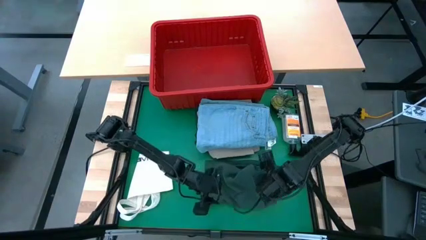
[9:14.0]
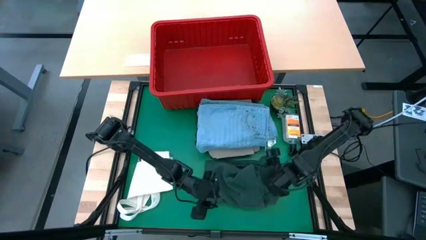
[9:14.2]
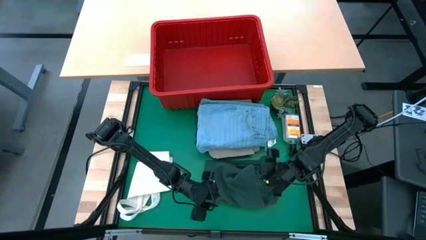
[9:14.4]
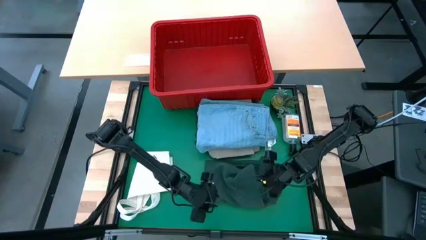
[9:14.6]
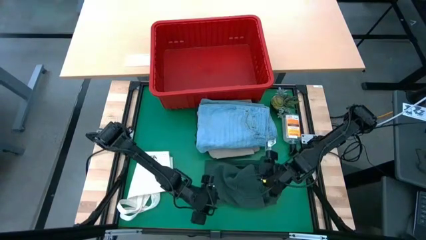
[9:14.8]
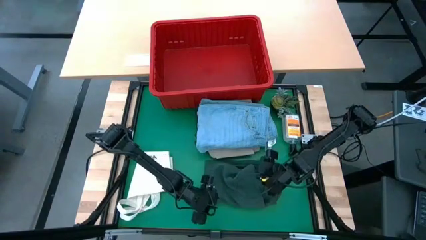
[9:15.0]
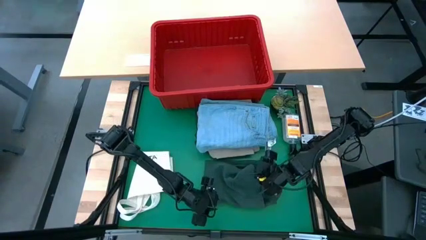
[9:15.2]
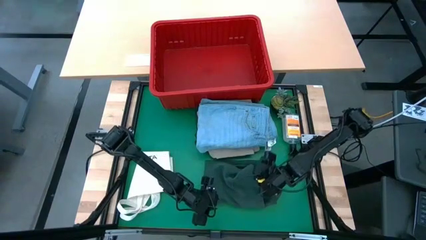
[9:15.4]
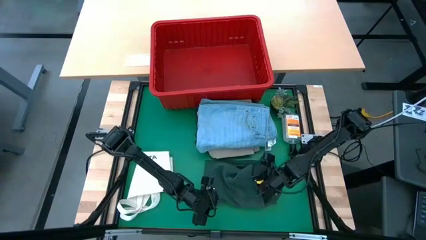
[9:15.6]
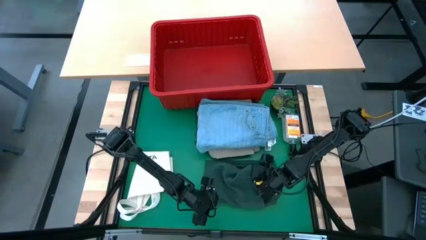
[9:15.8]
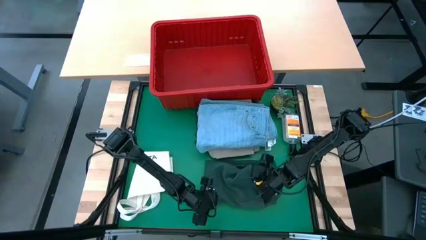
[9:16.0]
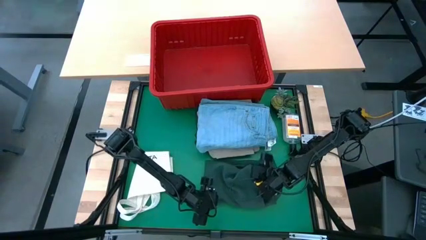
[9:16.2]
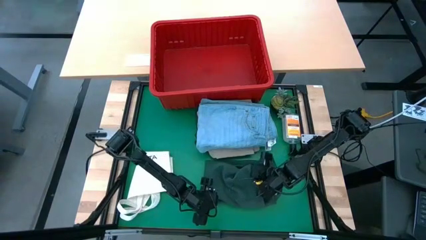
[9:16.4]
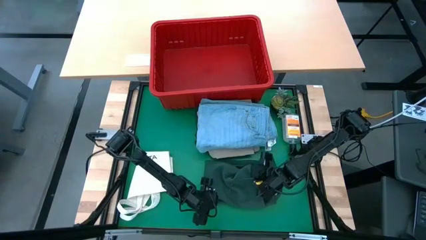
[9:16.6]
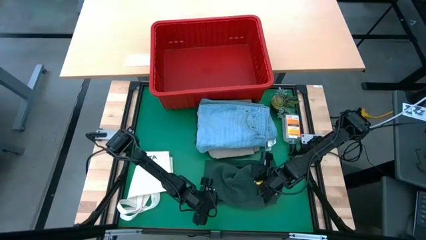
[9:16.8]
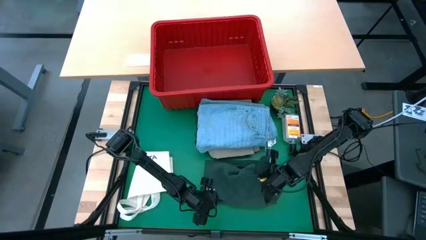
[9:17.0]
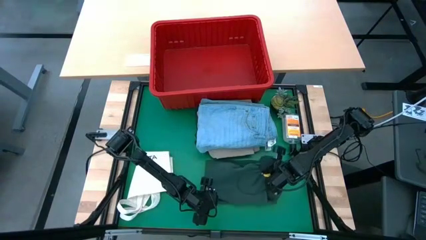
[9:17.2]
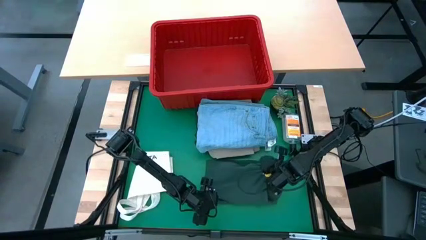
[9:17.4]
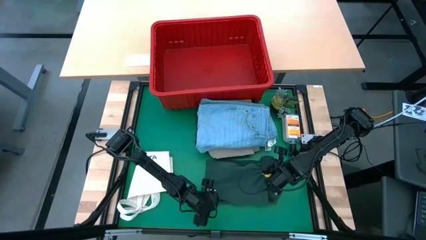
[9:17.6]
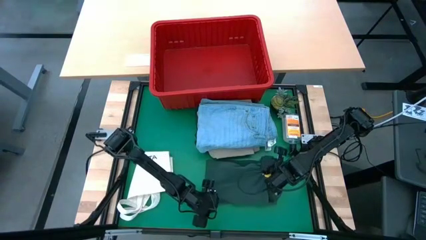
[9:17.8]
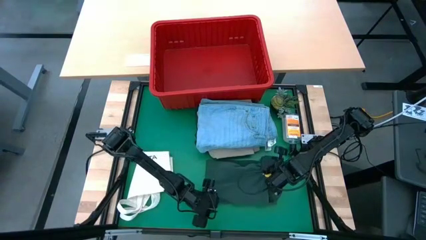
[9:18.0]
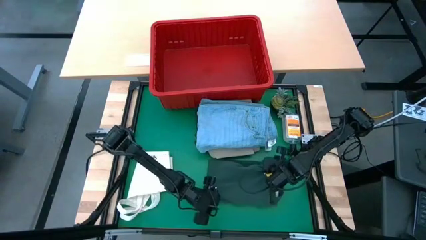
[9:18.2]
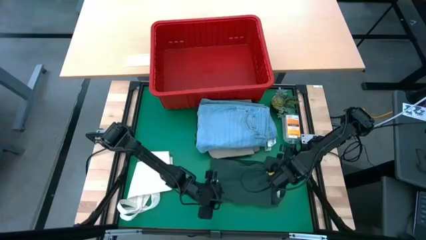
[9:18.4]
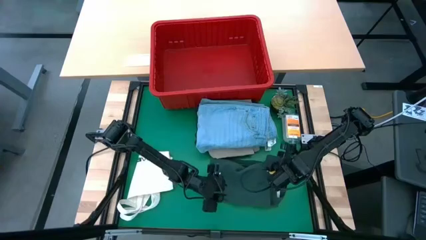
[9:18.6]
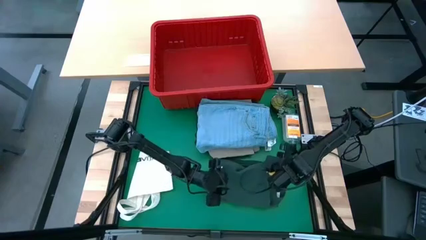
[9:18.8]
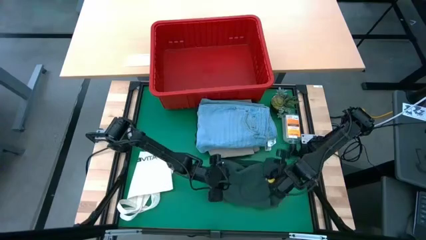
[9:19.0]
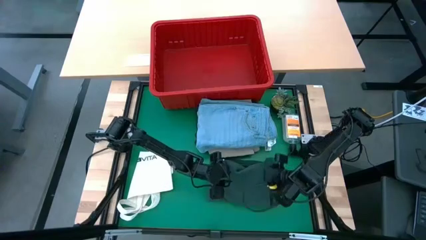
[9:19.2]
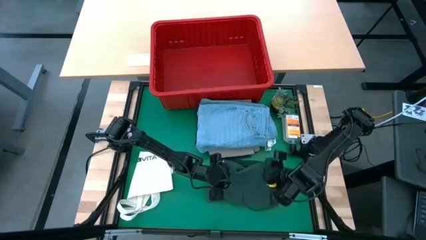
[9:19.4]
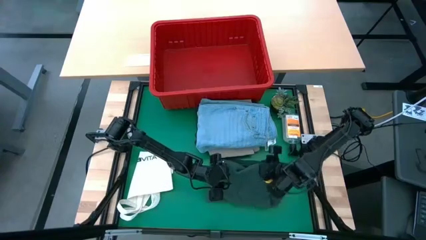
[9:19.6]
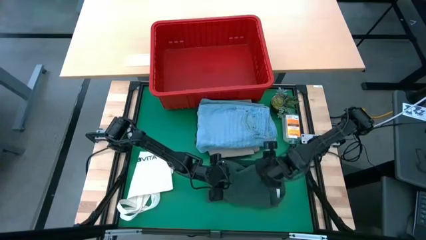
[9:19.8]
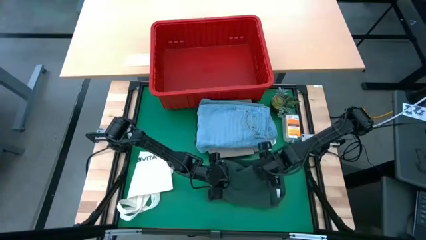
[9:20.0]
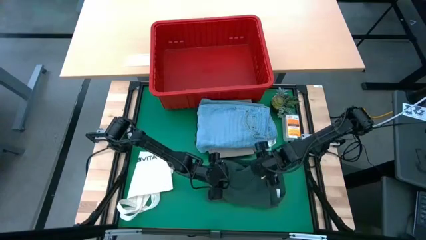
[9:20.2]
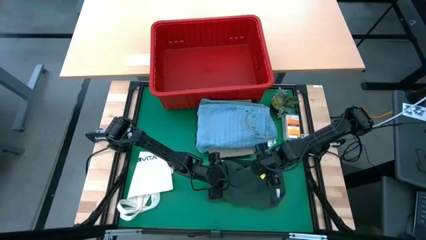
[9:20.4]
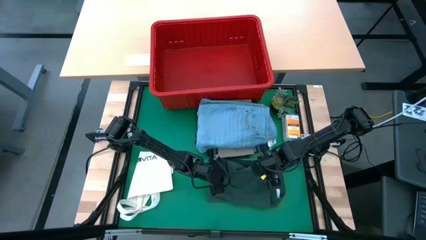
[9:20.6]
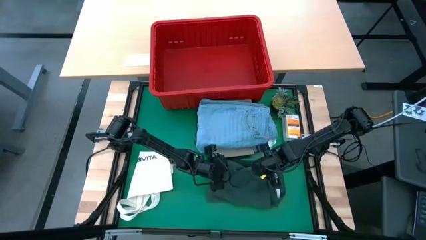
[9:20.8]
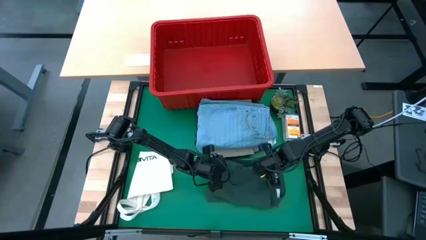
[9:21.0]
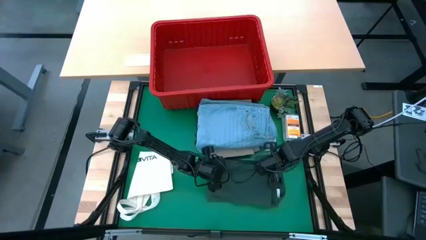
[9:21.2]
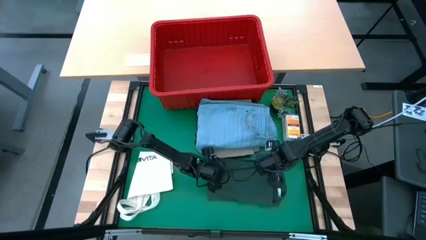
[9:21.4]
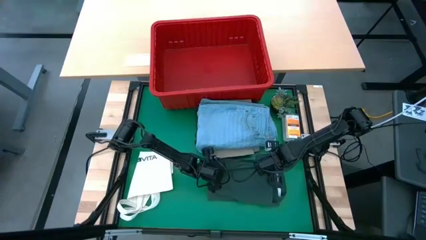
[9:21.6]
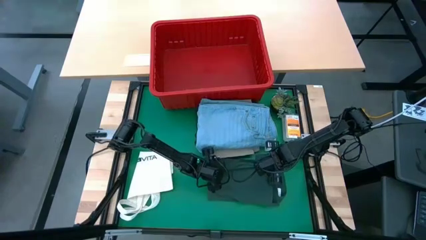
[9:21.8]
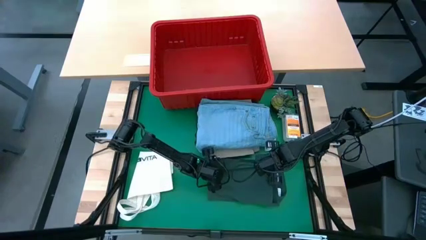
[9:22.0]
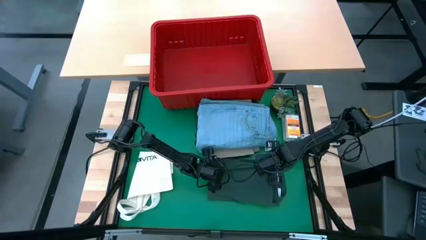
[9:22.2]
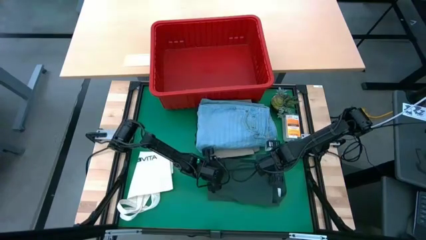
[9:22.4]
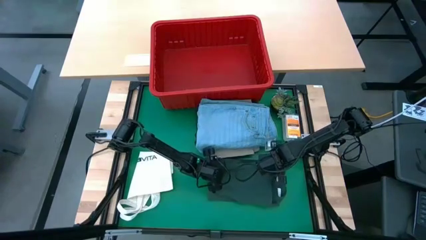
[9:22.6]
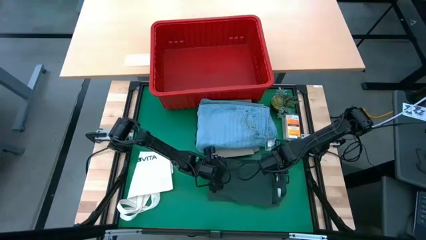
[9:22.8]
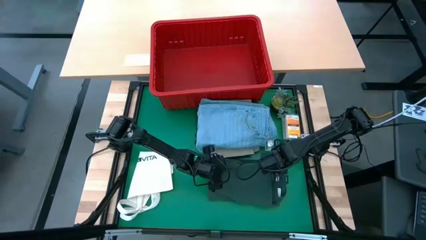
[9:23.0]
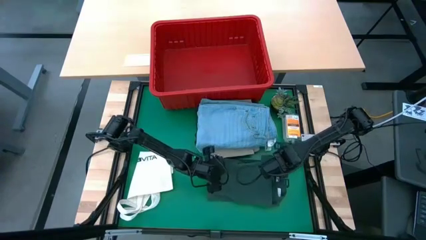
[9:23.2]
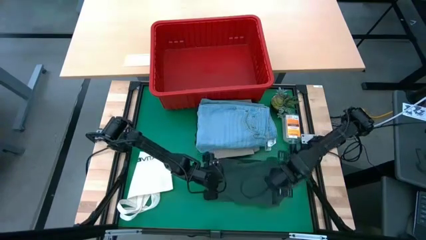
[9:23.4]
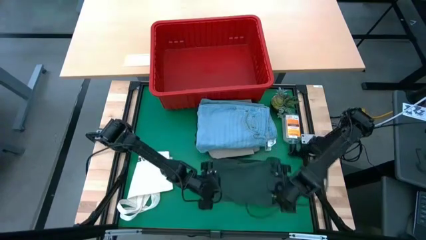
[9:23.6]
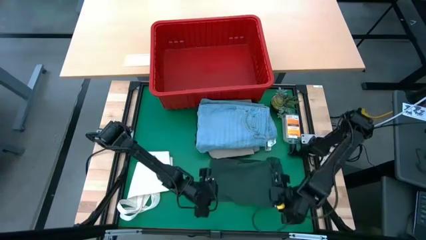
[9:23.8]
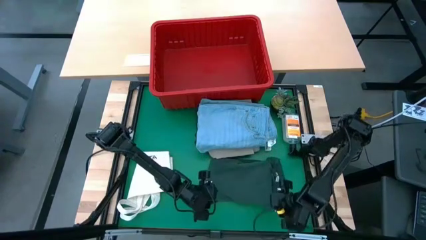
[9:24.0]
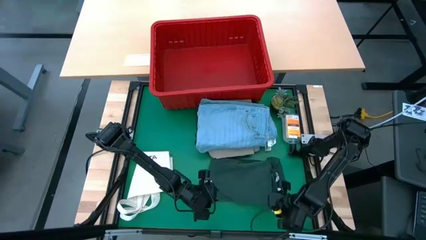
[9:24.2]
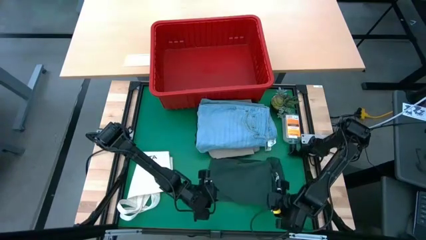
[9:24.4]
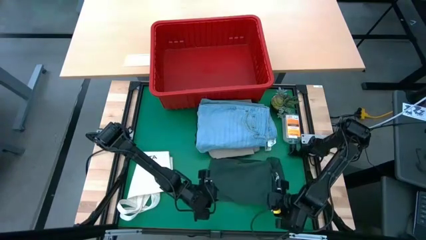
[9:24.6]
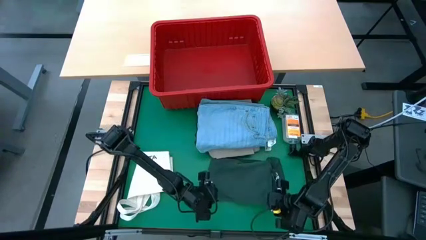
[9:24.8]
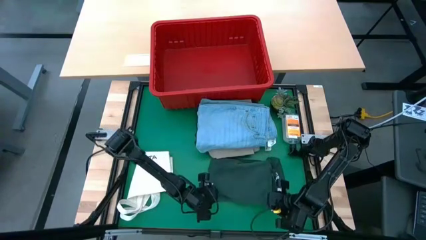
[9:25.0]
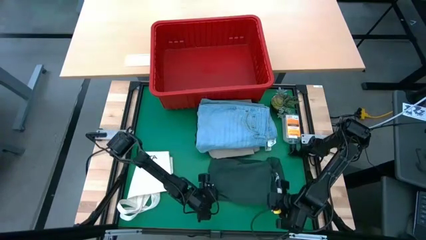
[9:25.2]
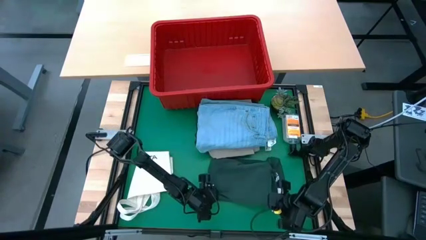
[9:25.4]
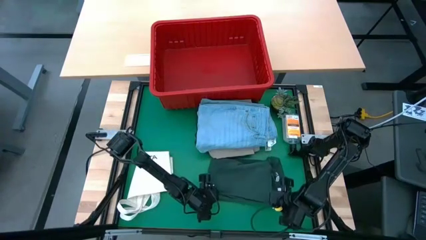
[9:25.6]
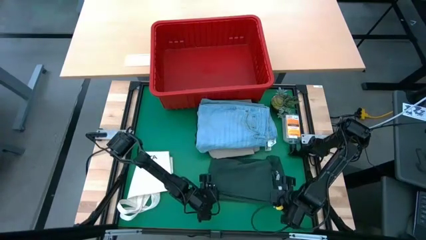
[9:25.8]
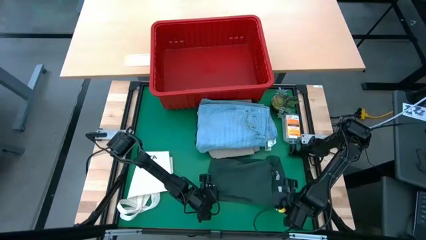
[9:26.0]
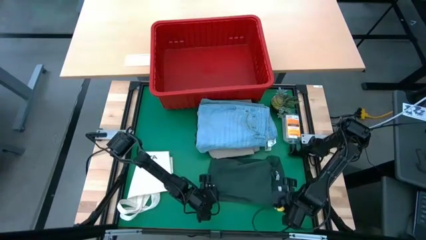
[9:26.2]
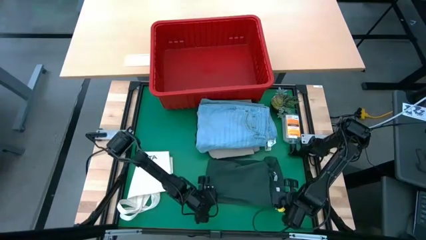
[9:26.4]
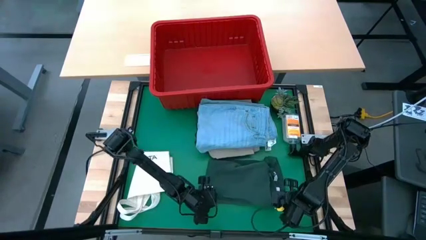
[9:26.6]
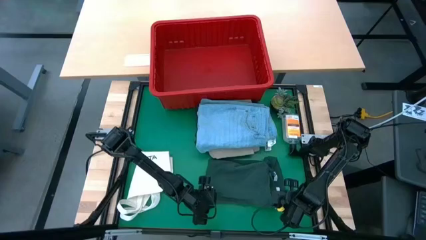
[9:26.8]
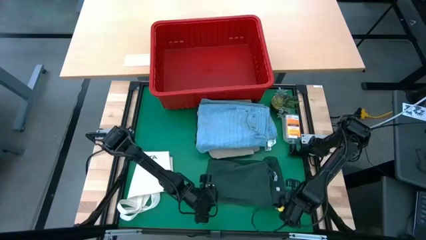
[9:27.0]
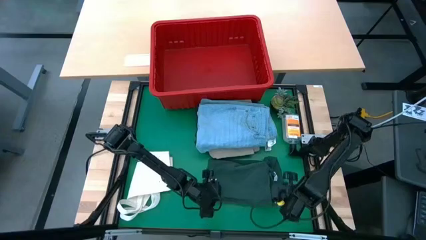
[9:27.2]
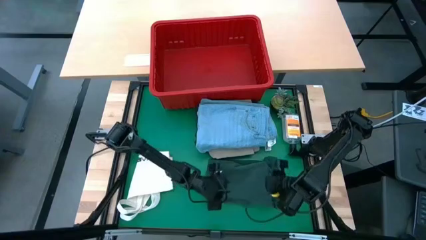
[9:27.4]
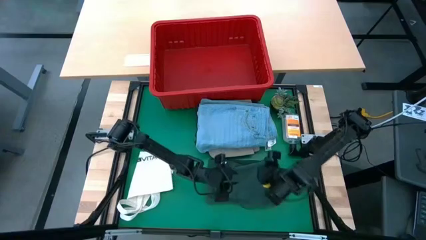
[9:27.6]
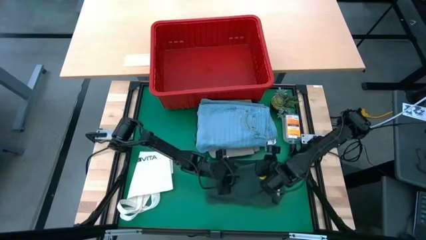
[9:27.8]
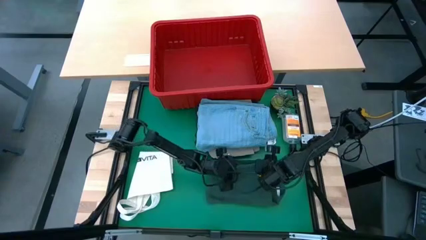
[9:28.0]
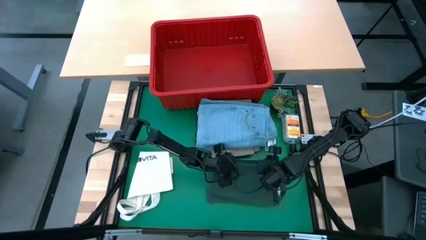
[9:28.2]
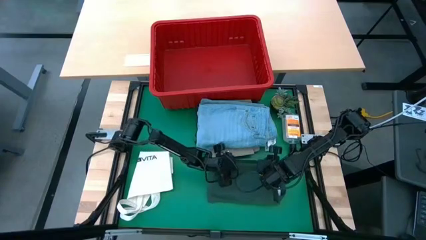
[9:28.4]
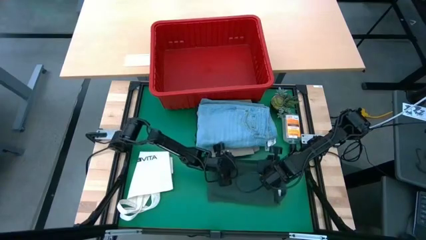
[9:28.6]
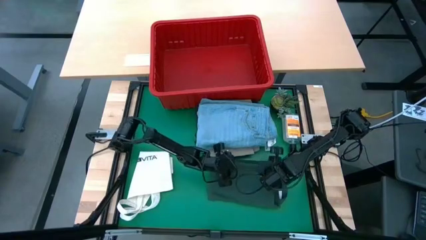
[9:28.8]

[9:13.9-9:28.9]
Task: Fold laundry
Fold the green polo shirt

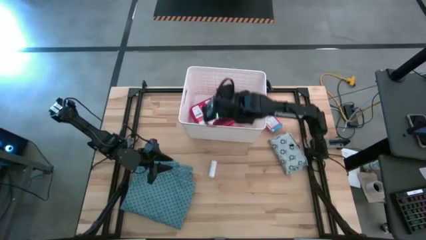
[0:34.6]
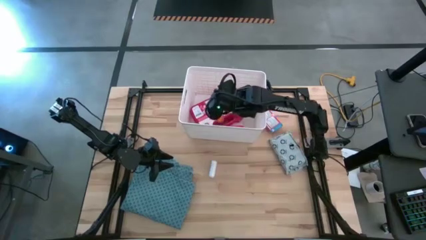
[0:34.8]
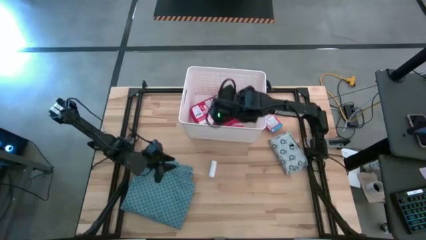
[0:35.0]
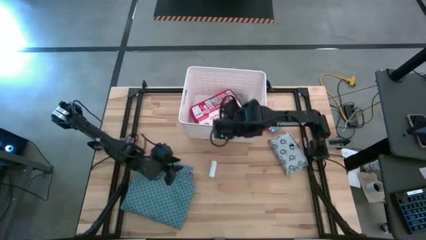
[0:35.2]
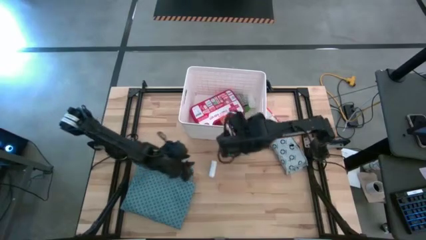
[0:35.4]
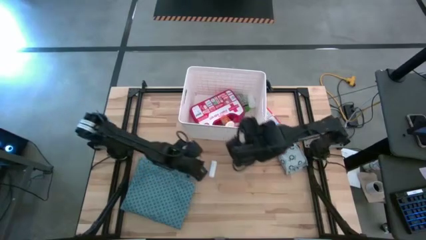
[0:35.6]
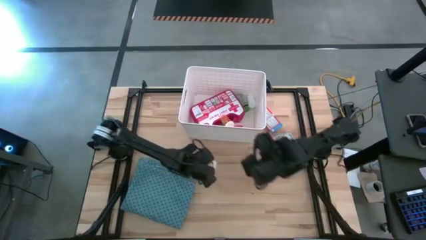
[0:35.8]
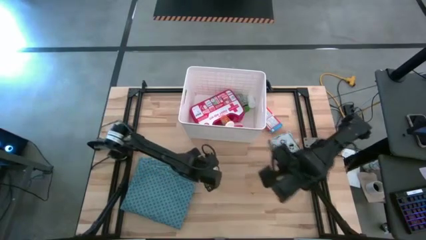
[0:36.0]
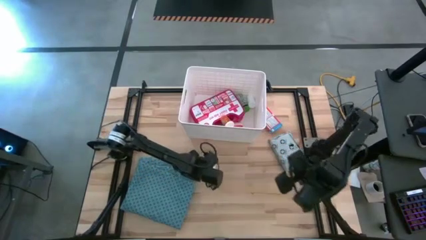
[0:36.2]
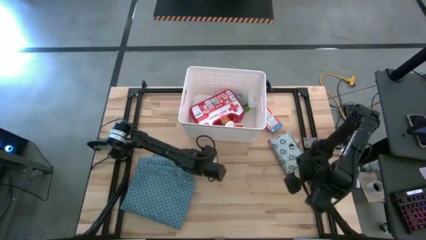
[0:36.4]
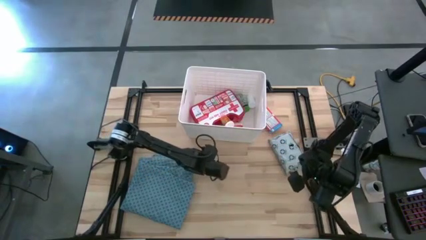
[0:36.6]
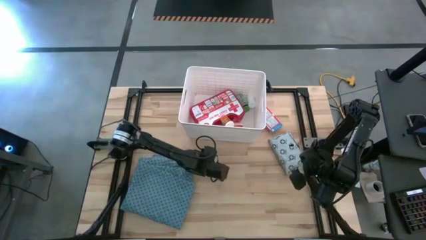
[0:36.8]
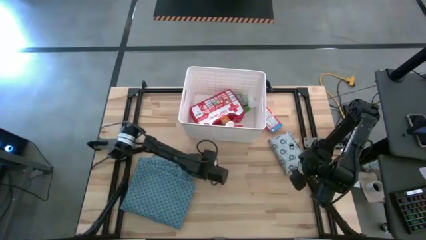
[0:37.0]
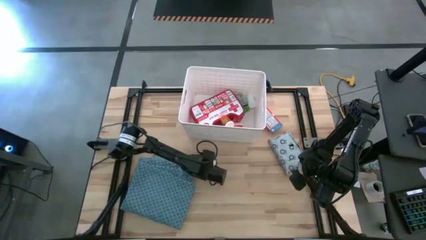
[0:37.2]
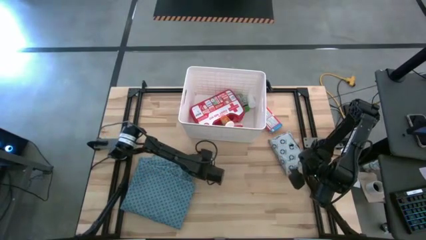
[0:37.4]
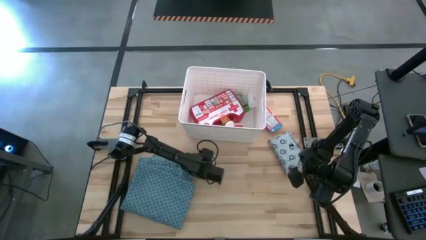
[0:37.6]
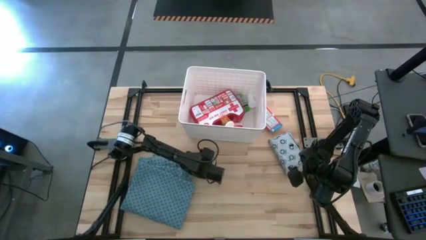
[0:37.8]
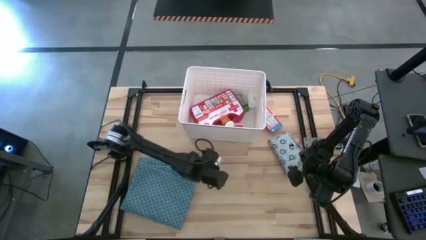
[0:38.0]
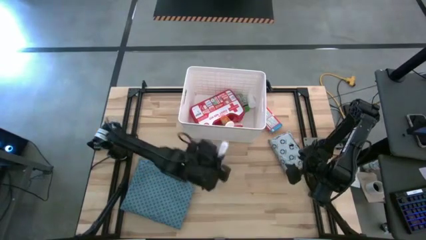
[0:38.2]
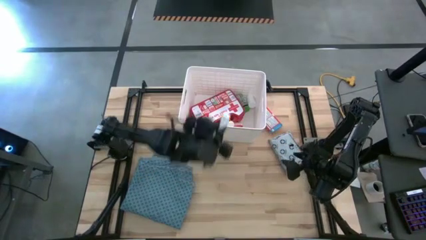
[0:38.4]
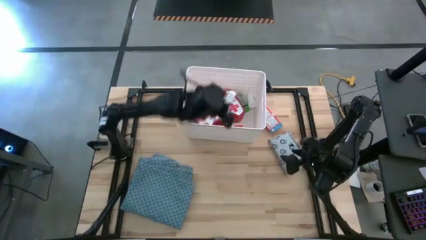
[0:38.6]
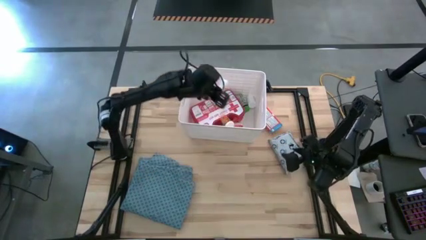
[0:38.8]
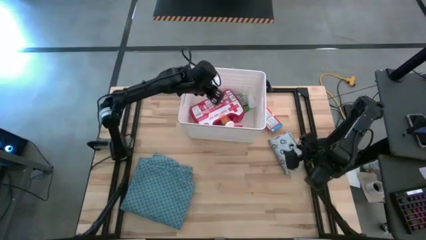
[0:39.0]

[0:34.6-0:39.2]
Task: Pick & place medical supplies in basket/bin
Put the white rolled gauze into the white bin
